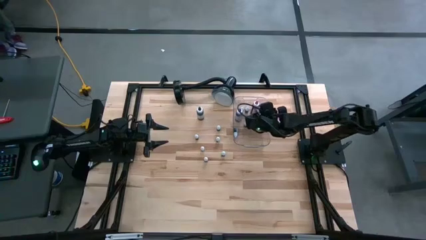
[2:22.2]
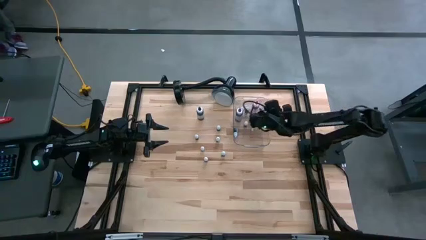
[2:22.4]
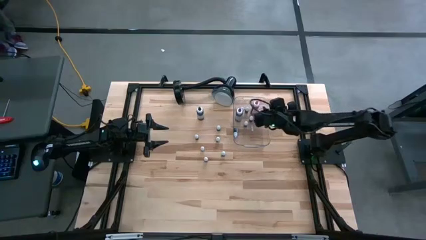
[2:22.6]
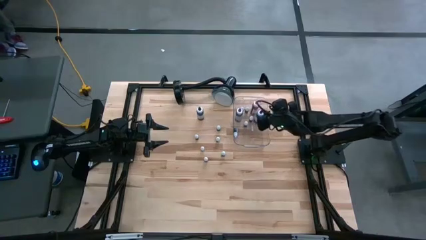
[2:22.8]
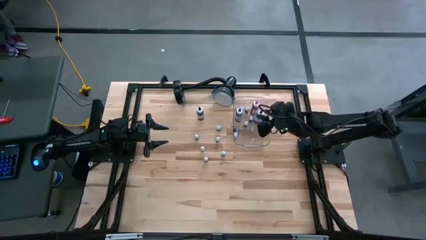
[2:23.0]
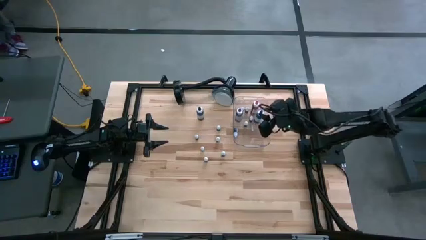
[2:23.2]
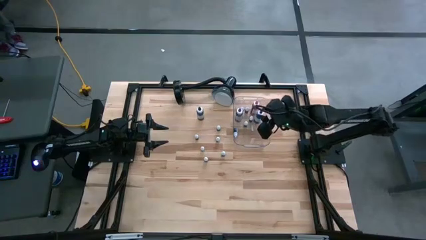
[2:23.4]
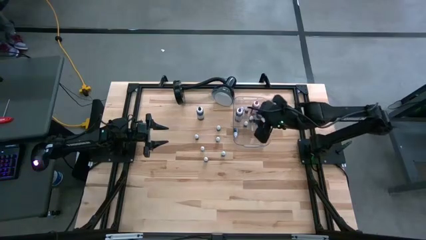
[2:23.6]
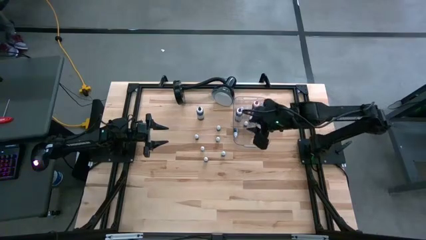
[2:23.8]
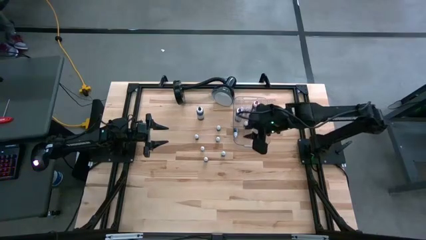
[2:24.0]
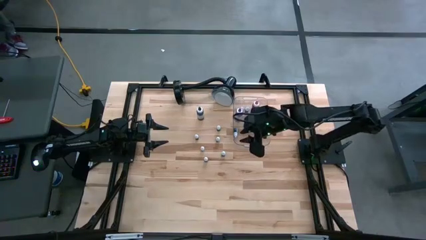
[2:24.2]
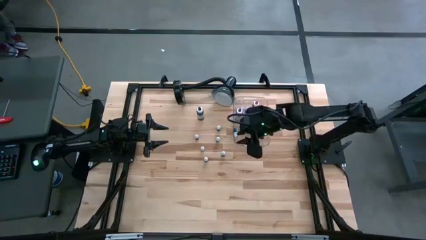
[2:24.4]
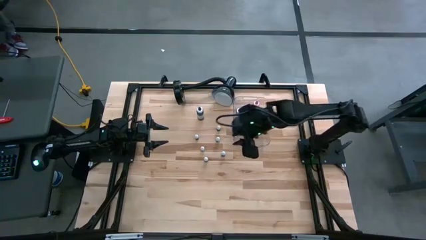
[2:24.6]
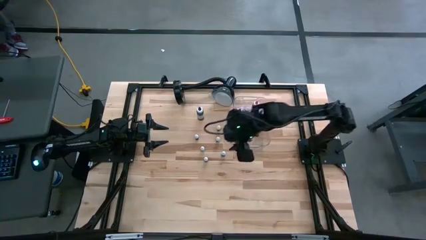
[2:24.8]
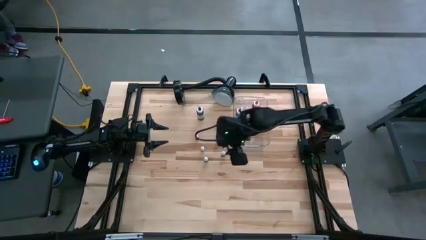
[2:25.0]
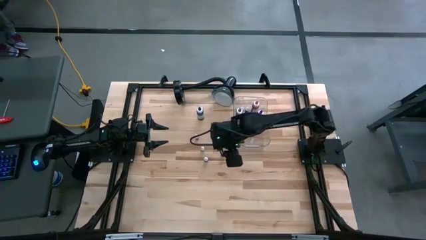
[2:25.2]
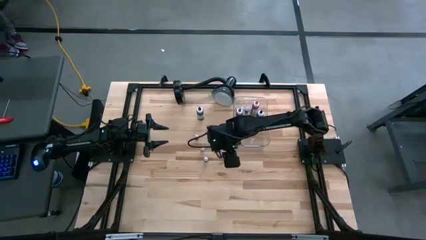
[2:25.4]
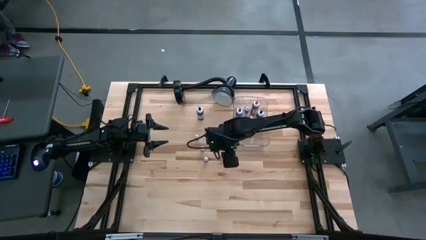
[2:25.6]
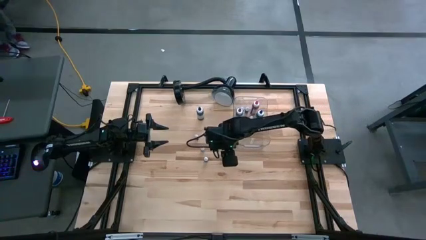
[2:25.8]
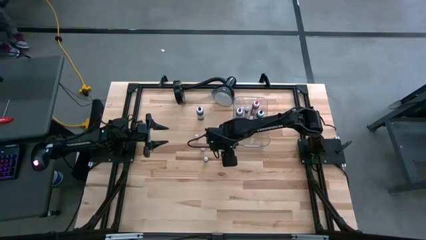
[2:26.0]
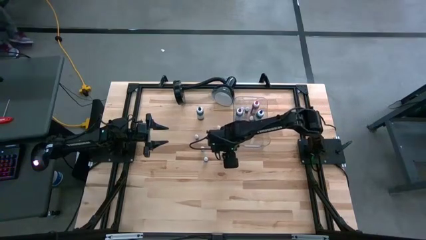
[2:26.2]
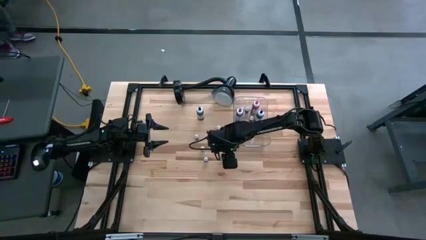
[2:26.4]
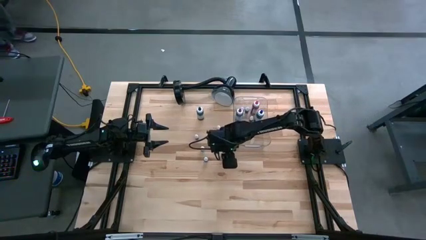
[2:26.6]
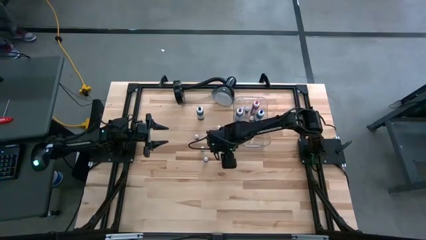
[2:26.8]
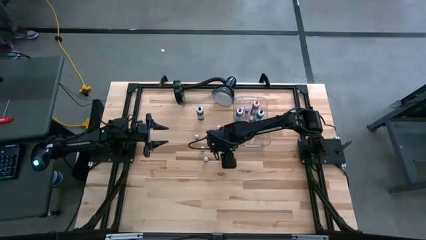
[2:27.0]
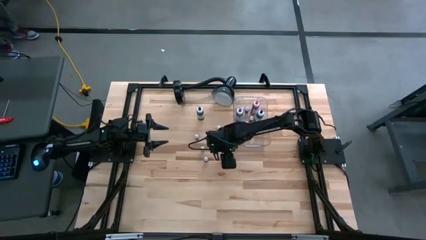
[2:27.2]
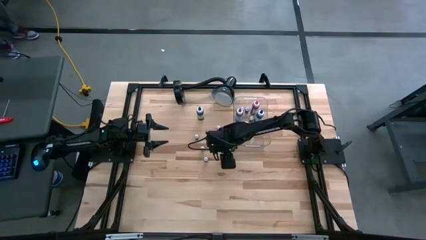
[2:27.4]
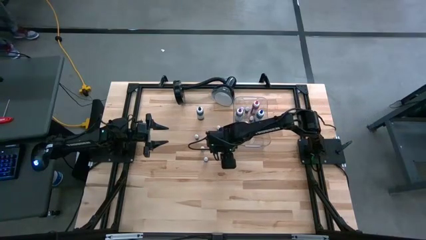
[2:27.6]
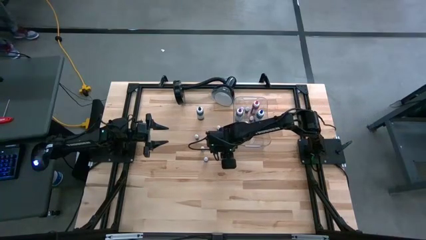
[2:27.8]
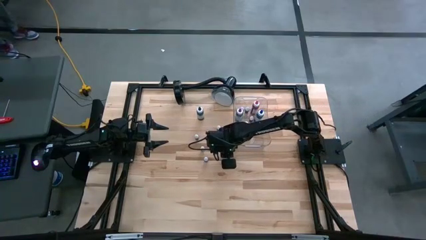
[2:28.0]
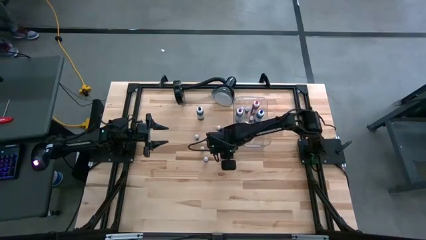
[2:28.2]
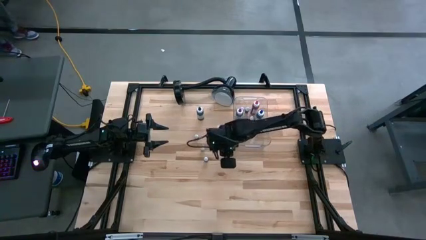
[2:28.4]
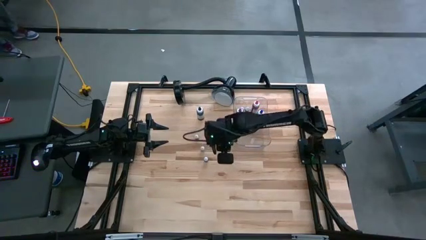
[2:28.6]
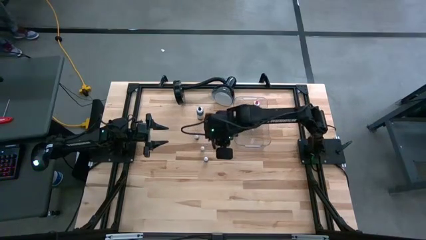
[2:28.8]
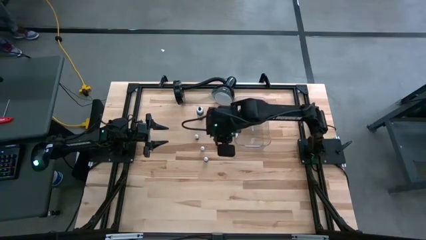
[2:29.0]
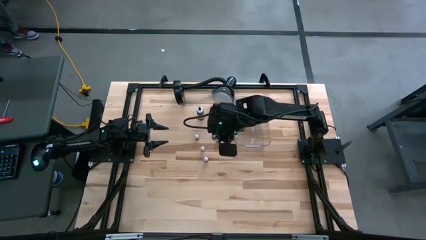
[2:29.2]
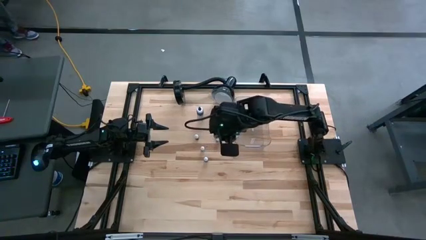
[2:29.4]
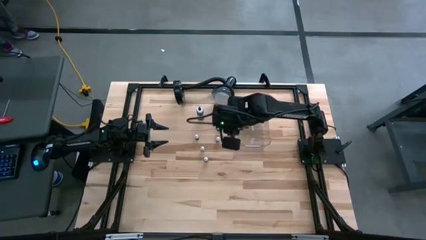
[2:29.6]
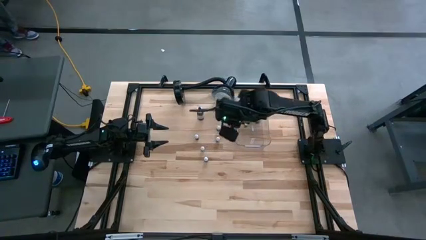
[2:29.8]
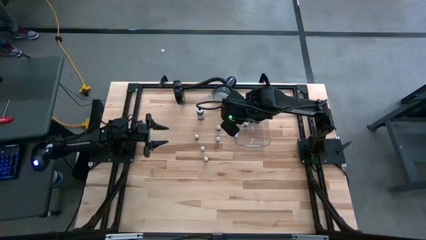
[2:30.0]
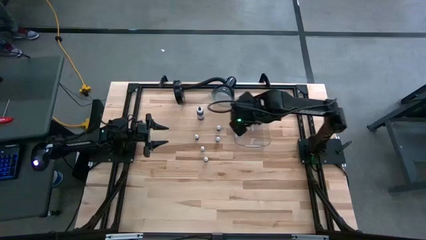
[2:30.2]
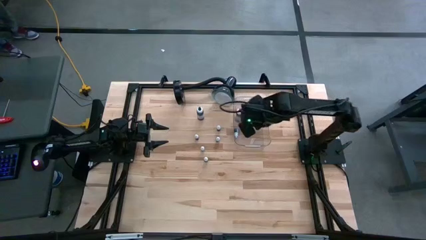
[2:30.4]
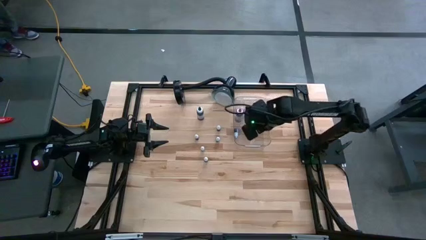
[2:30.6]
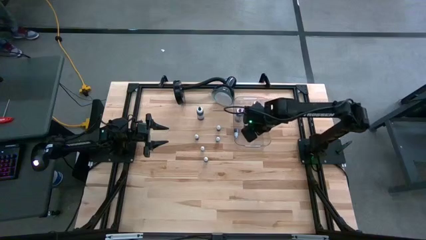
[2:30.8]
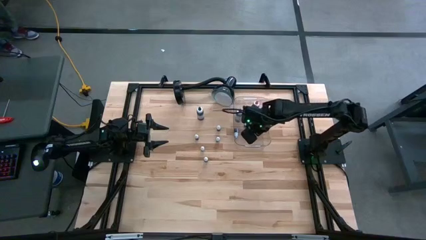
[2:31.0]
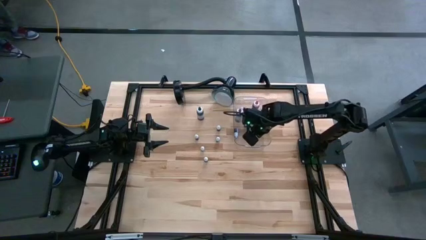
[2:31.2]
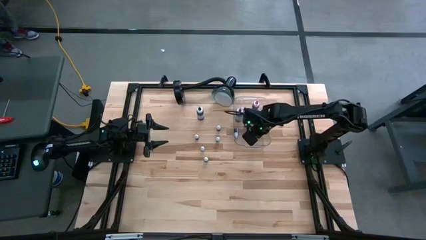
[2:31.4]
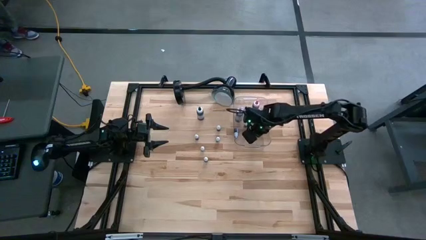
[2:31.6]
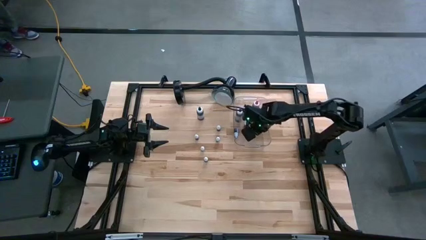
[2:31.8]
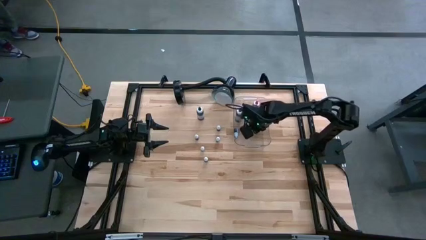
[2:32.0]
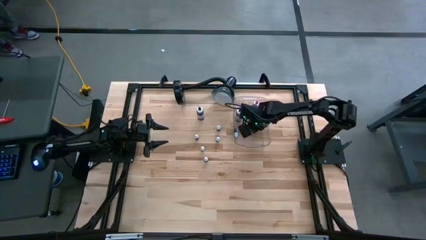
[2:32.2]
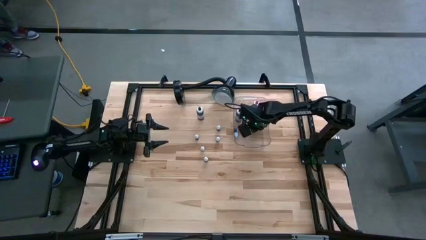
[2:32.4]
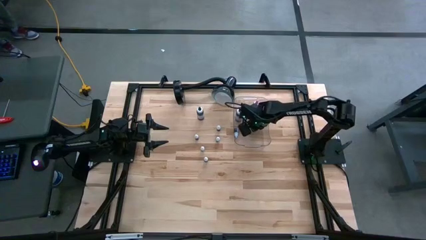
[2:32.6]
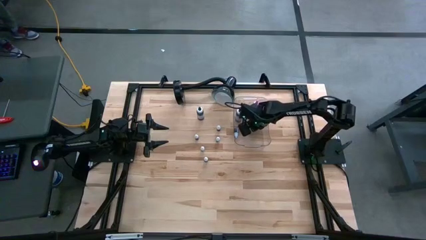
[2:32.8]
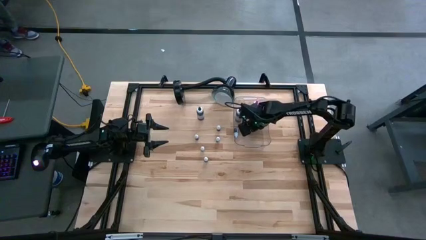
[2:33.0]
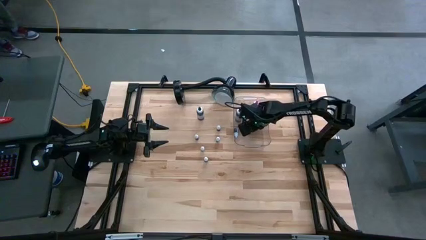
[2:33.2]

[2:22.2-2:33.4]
Task: Pick & Place food coloring
Put the small black food coloring bottle into the transparent bin

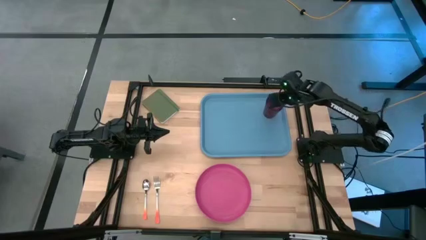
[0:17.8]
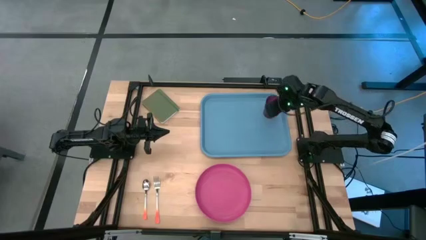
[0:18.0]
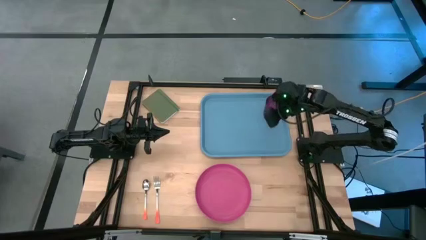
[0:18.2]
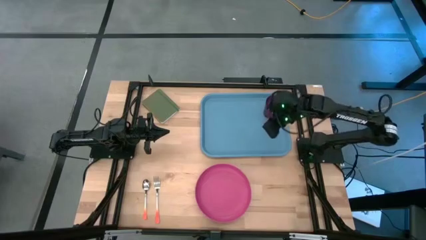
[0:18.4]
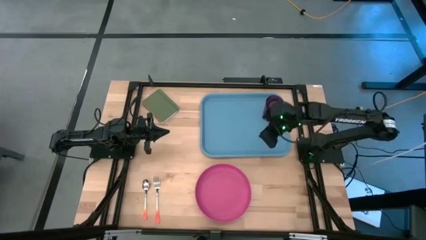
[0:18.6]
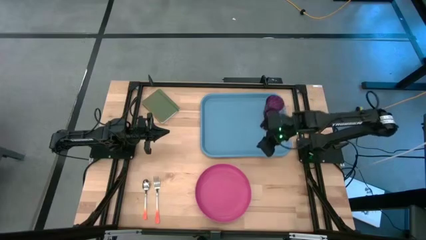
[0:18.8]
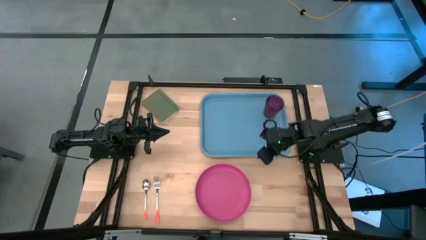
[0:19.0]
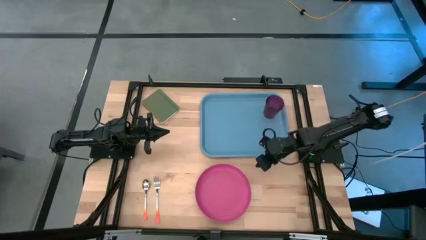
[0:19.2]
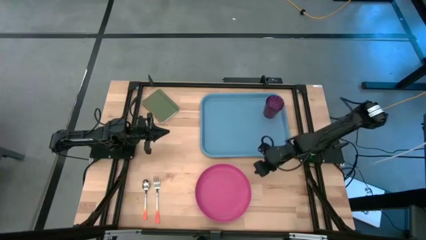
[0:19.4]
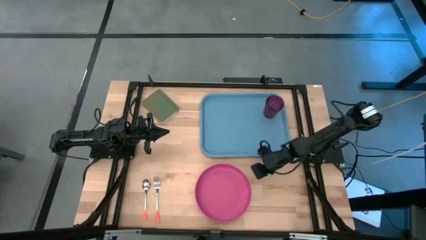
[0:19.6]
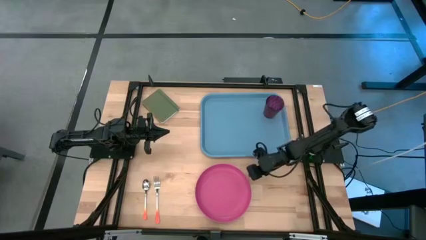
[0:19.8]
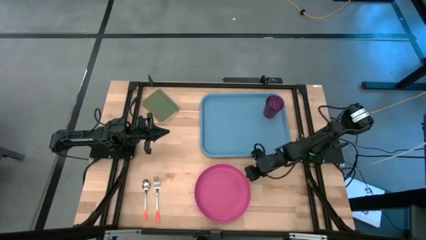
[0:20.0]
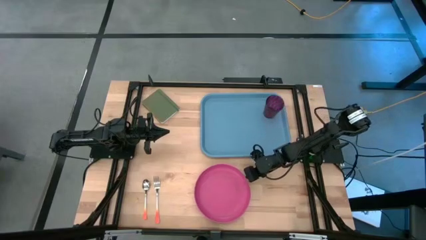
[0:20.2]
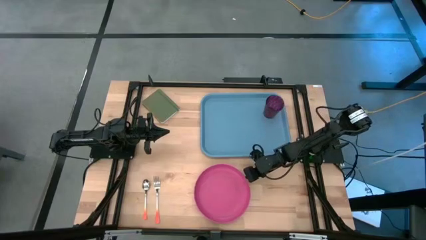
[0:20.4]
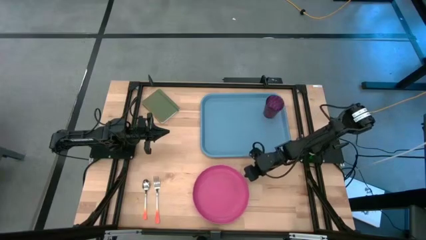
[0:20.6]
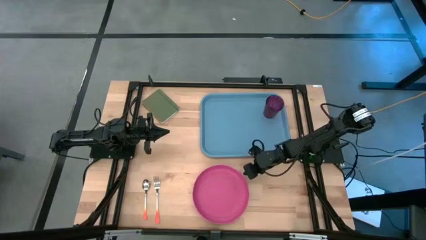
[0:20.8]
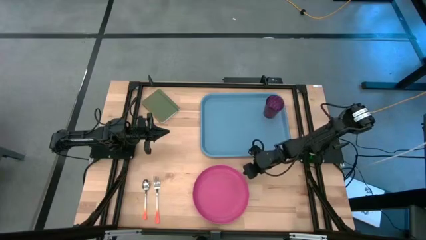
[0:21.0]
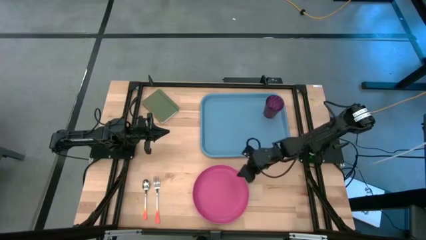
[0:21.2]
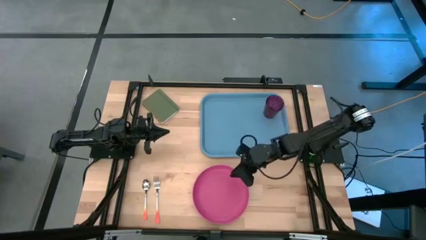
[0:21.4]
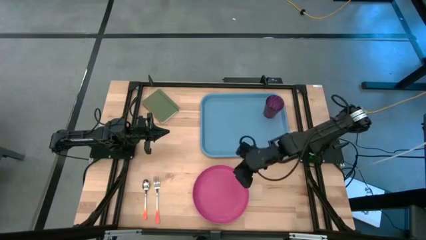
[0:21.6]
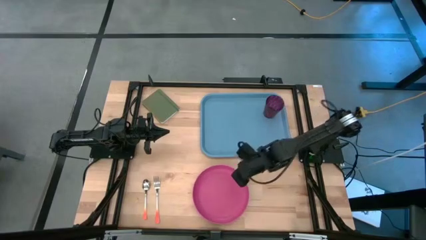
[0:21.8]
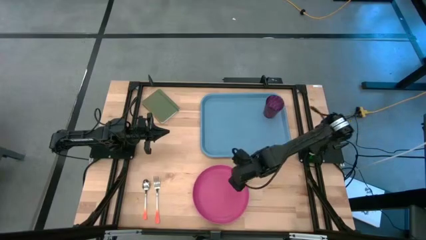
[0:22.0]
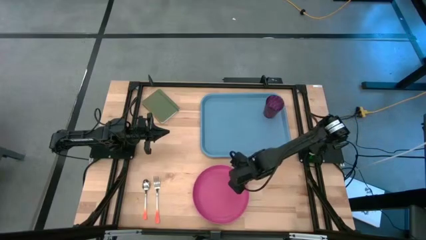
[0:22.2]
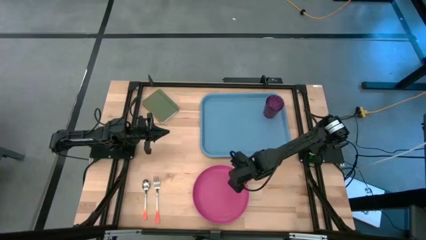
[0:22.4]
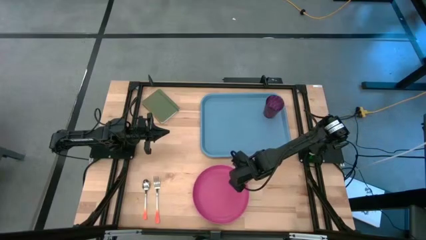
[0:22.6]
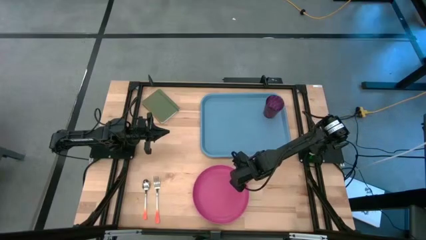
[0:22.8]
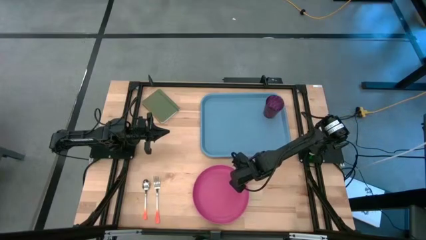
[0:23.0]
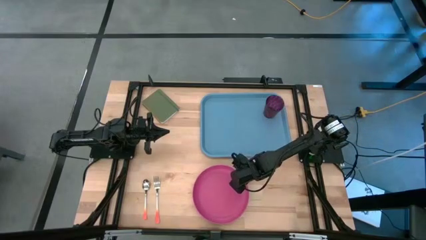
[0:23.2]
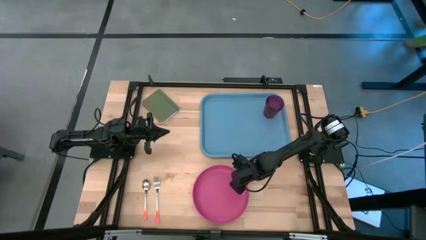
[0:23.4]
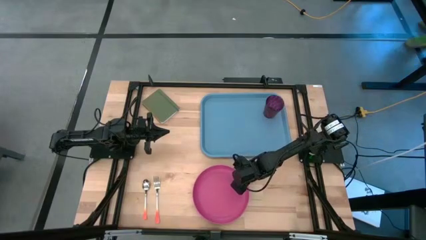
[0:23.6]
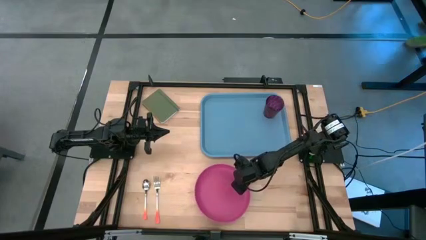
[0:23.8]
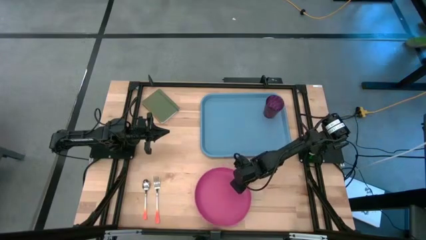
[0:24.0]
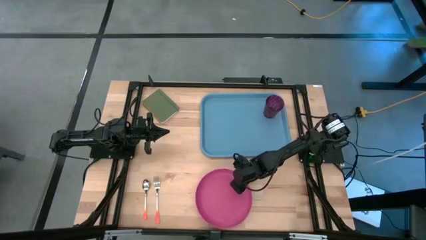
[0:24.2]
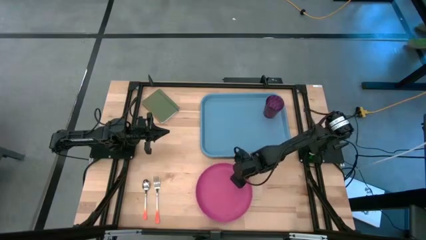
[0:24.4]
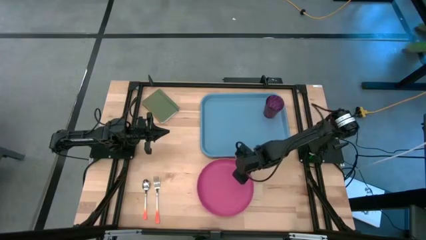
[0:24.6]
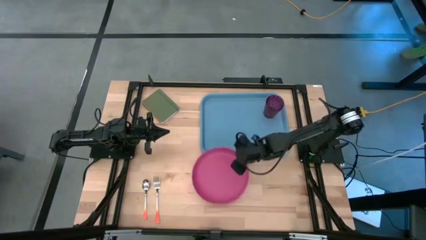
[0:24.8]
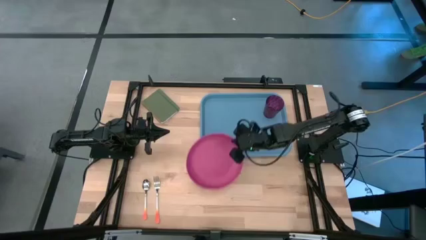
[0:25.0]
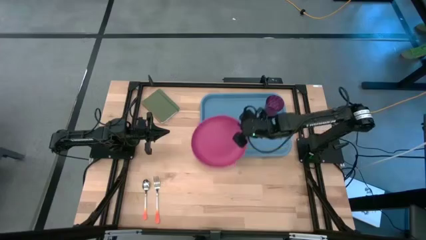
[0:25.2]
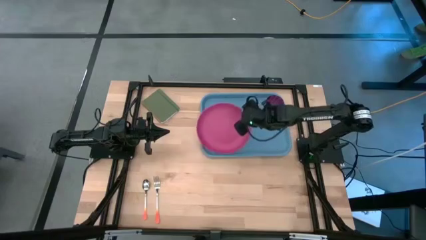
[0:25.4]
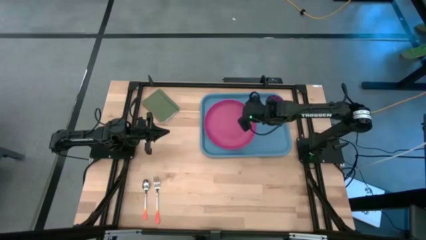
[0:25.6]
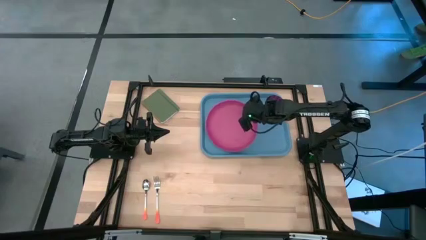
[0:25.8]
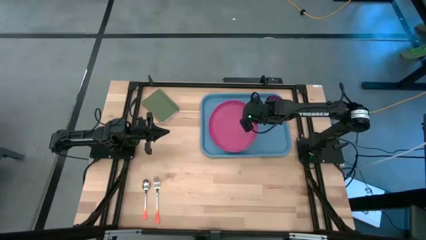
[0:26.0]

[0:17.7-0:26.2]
Task: Pick and place plate/cup/fork/spoon on tray
Put the pink plate on the bottom left of the blue tray
